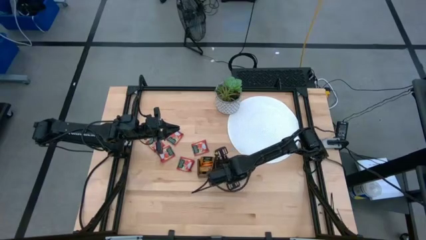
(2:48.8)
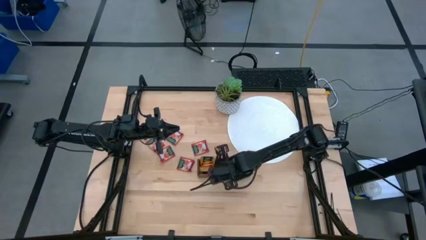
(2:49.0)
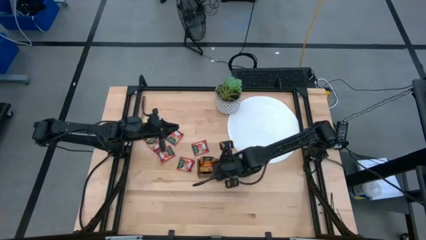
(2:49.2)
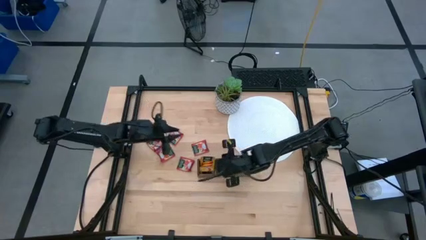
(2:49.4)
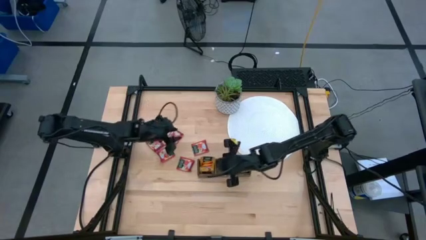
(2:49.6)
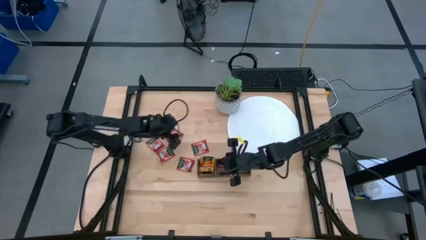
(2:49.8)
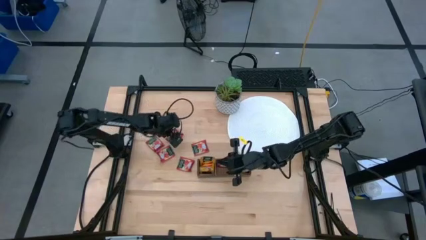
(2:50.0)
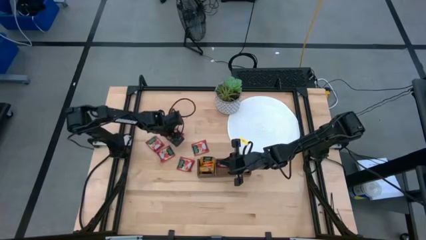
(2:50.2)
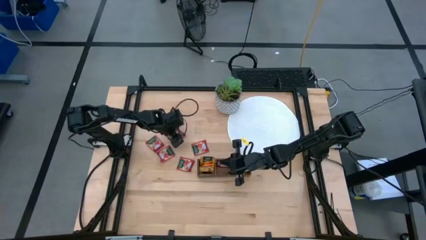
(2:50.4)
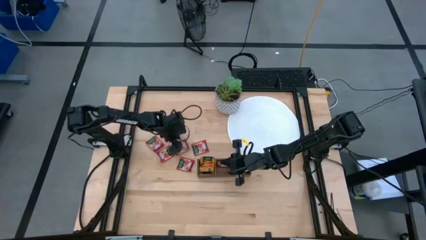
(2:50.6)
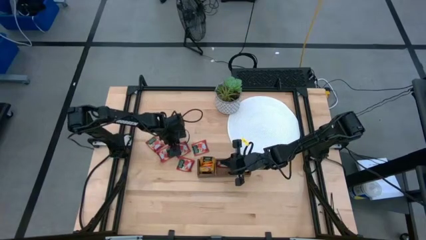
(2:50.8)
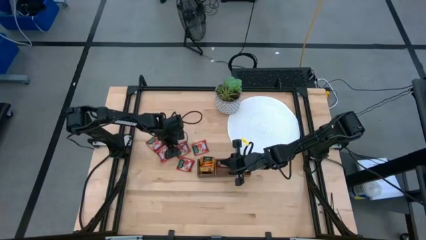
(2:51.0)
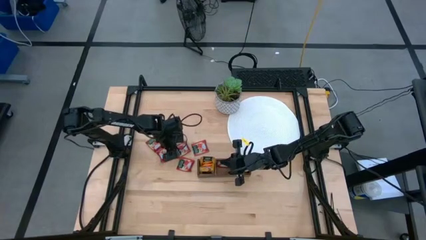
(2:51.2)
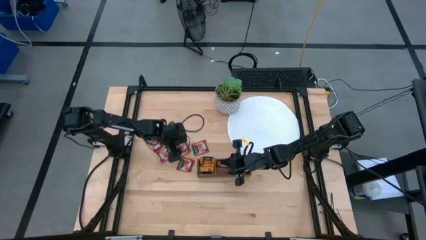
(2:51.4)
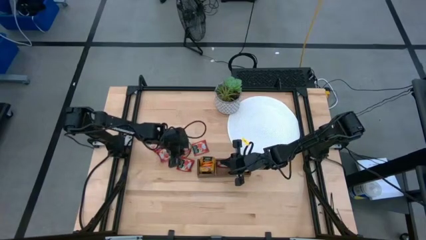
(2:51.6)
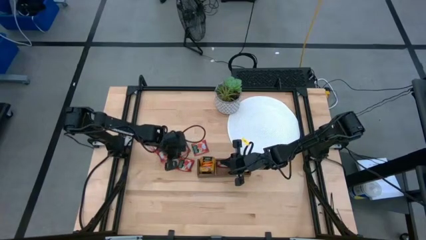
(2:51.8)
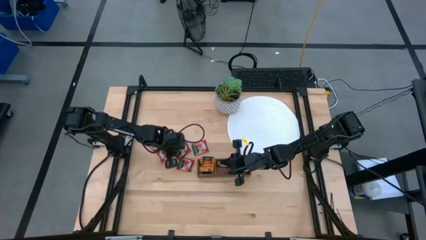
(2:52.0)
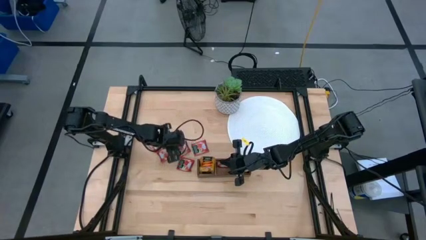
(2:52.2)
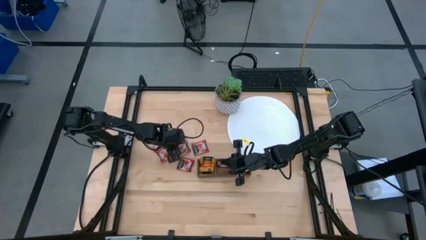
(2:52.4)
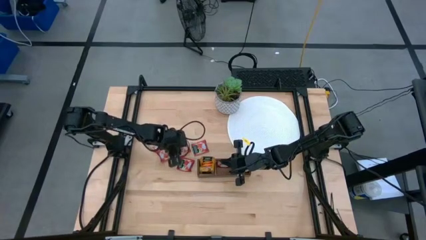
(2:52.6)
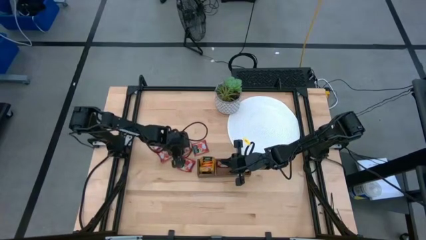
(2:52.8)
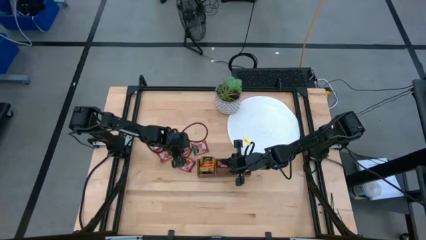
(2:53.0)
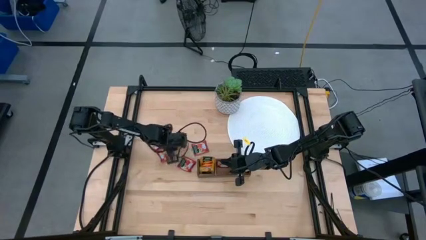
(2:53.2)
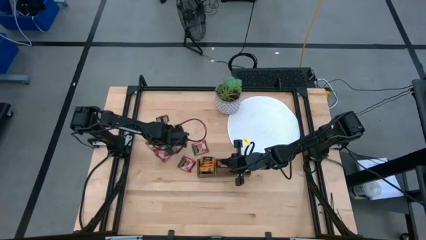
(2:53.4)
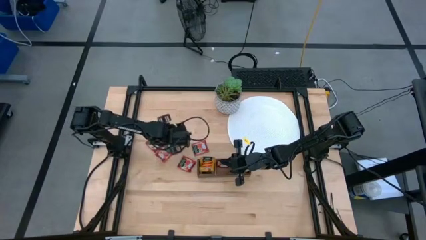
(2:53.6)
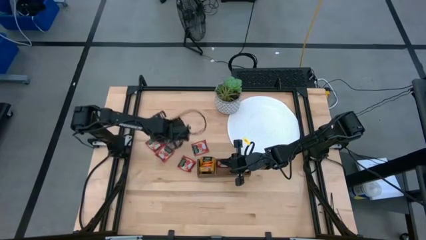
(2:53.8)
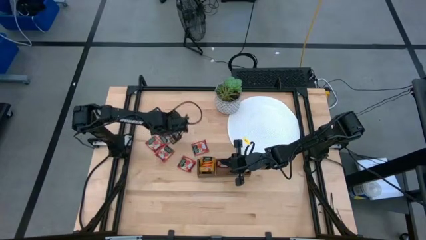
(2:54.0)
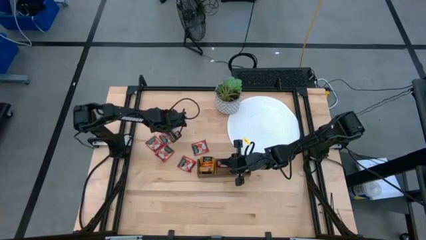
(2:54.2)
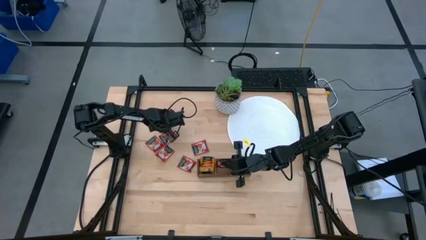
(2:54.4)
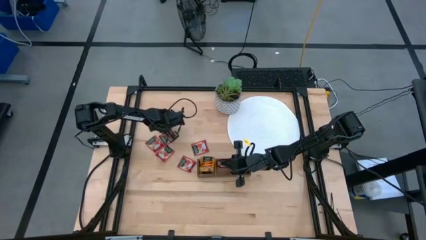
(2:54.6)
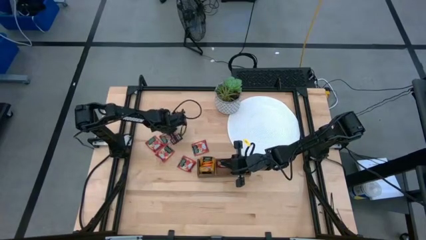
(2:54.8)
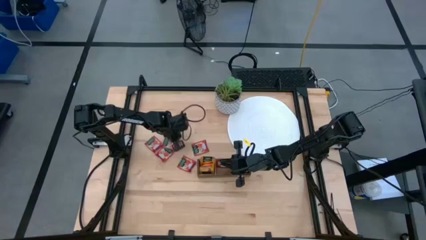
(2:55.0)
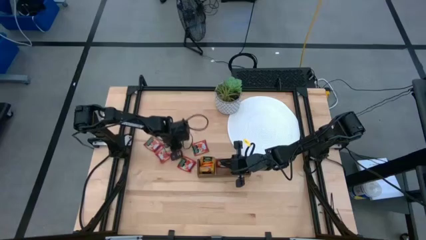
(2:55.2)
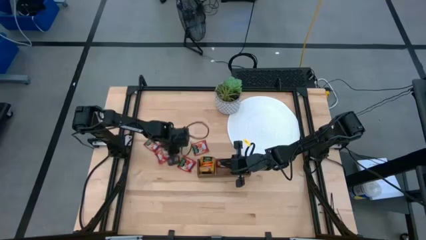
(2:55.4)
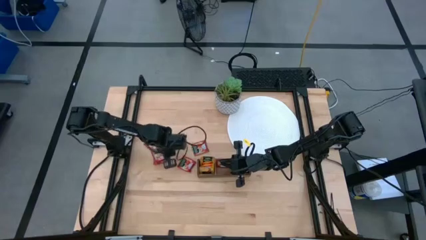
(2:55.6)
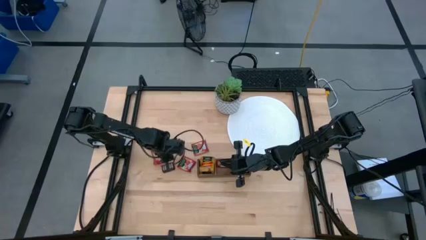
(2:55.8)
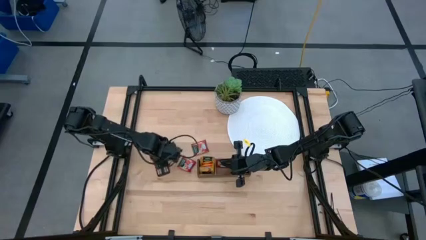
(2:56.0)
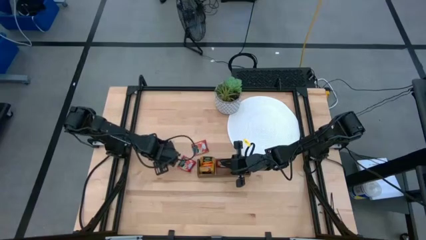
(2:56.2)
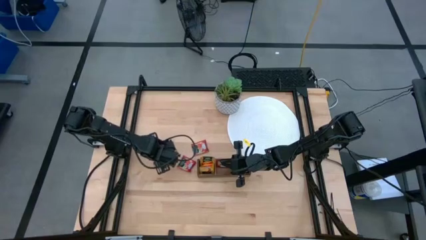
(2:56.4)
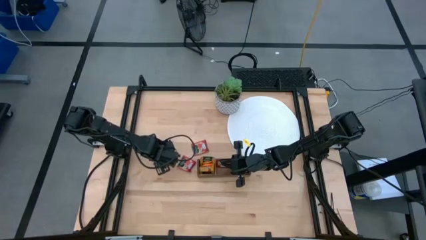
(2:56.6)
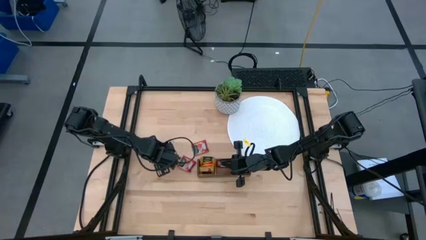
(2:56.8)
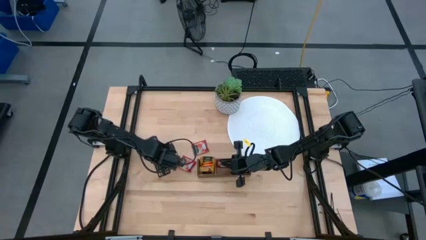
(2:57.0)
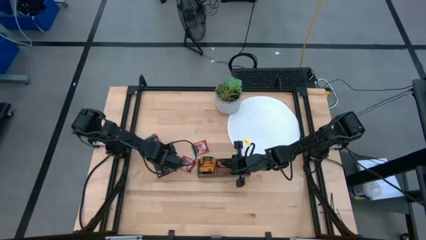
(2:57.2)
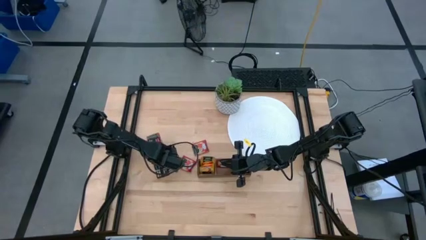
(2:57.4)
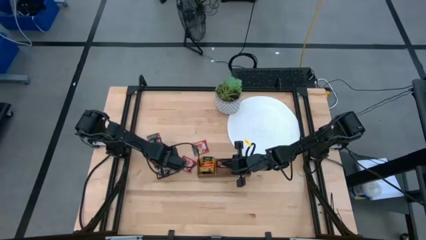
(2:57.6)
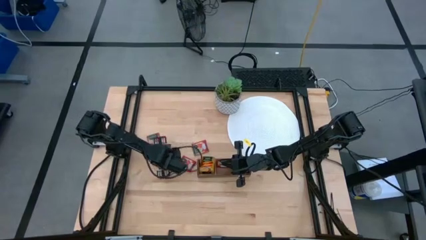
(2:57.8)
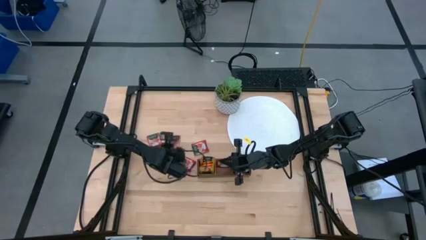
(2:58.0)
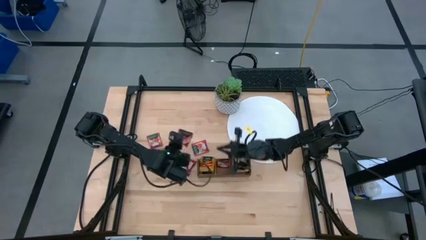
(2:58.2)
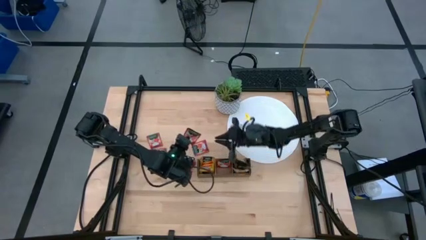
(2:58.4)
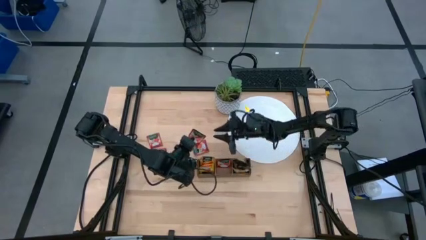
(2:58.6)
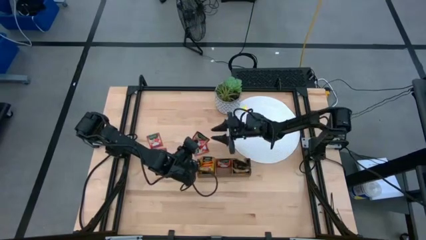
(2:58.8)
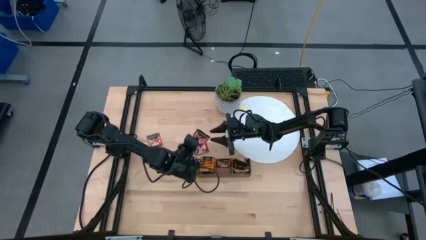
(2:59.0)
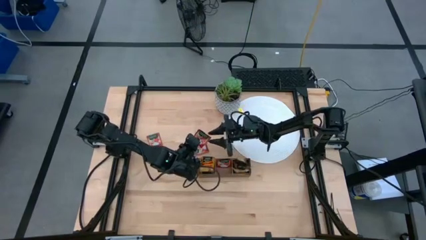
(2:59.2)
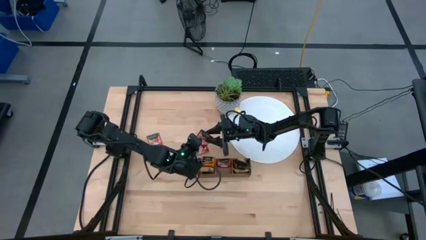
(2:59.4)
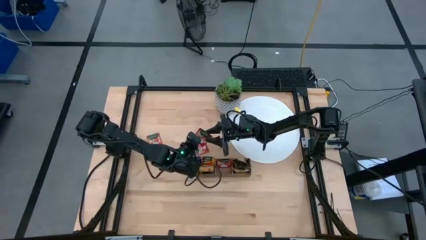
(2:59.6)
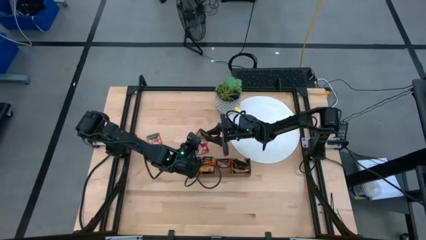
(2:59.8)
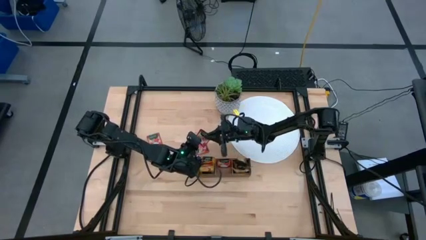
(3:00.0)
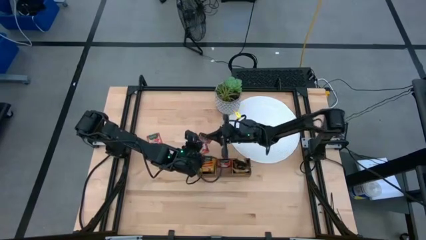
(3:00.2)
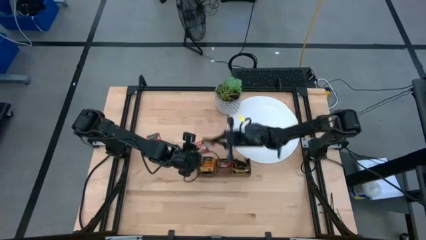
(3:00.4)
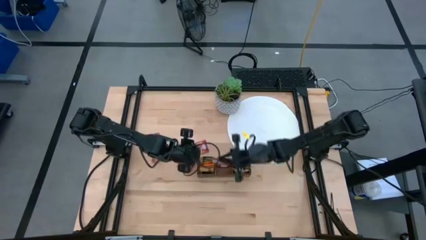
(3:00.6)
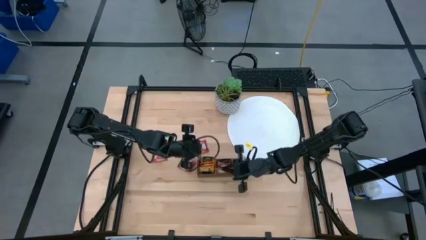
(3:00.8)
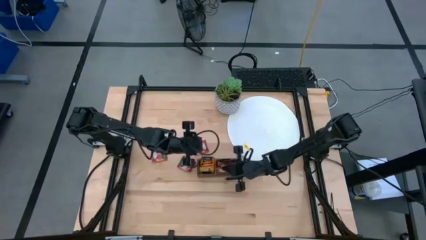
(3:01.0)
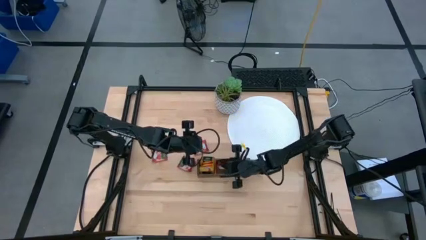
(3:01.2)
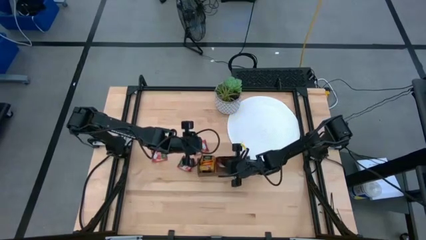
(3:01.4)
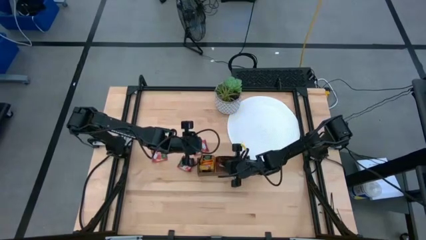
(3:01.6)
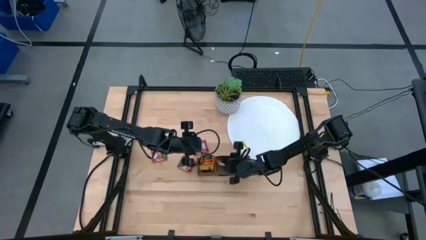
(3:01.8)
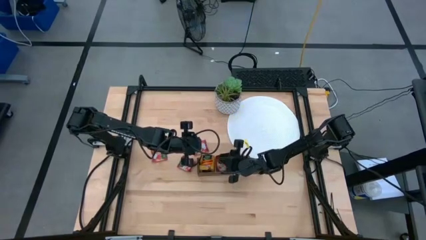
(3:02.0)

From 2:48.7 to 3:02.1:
Task: Pick & Place Tea
Put the red tea bag into the middle section of the wooden organizer

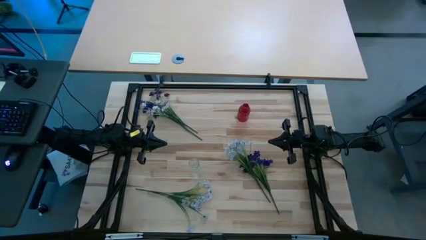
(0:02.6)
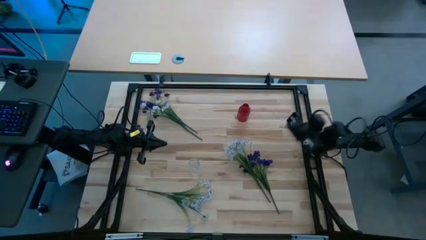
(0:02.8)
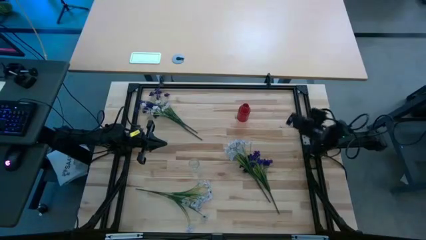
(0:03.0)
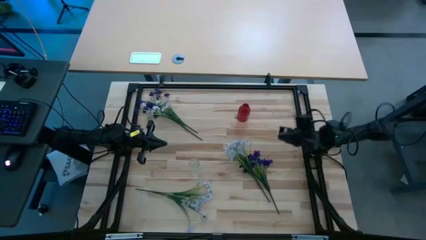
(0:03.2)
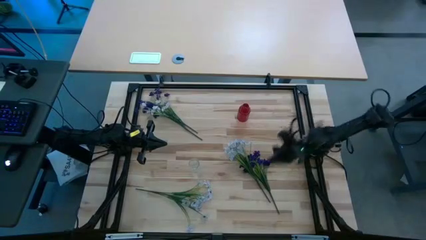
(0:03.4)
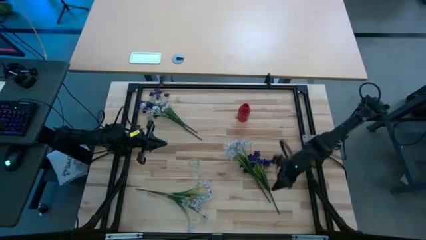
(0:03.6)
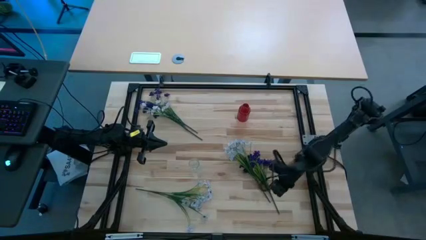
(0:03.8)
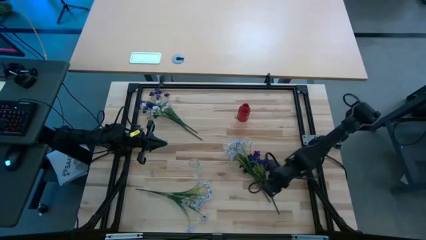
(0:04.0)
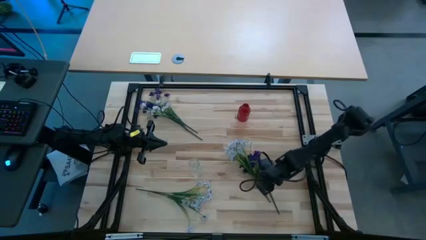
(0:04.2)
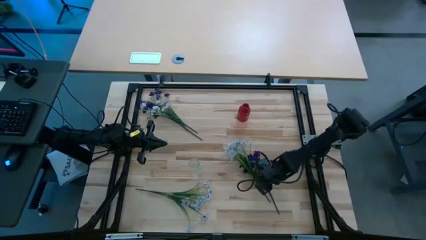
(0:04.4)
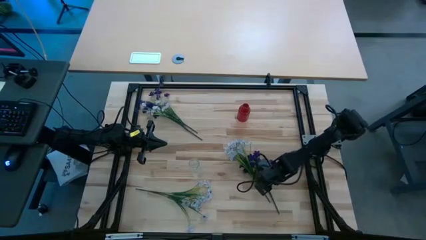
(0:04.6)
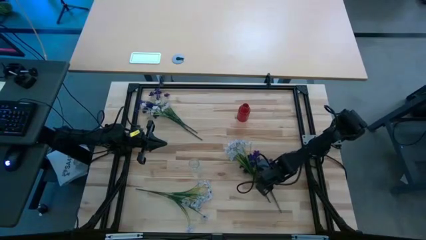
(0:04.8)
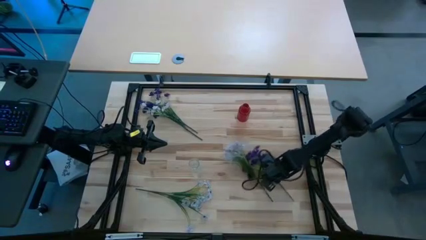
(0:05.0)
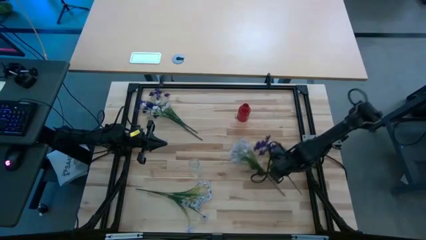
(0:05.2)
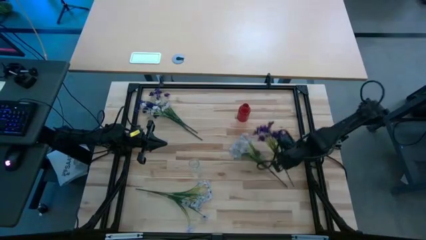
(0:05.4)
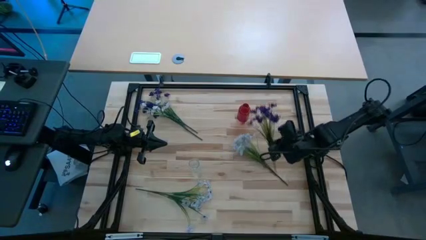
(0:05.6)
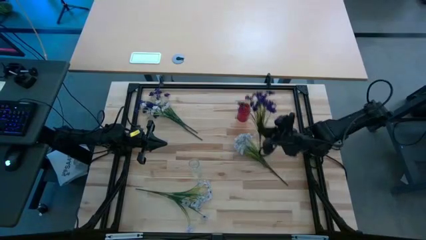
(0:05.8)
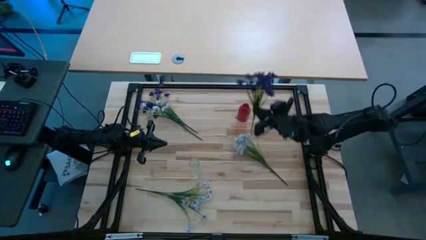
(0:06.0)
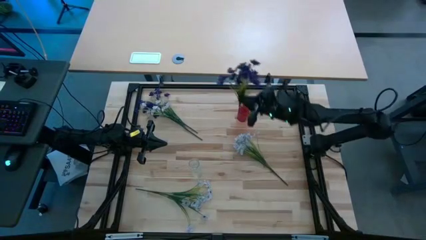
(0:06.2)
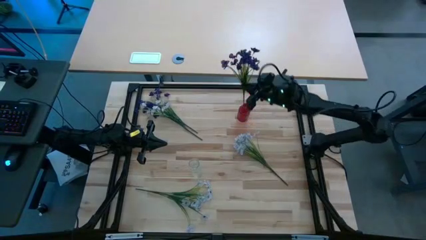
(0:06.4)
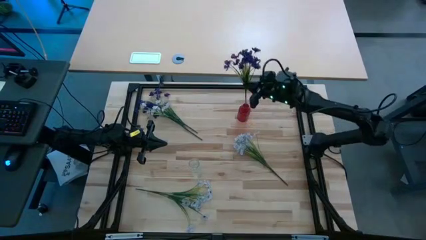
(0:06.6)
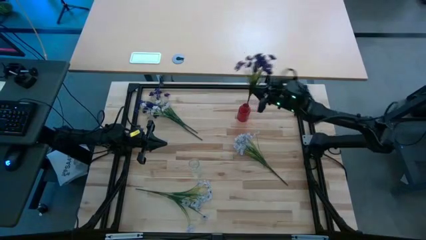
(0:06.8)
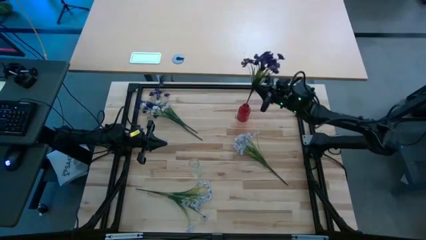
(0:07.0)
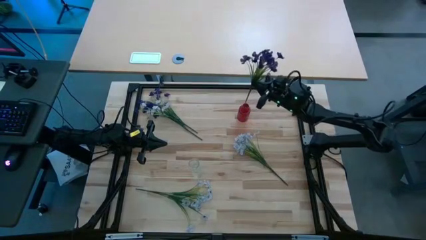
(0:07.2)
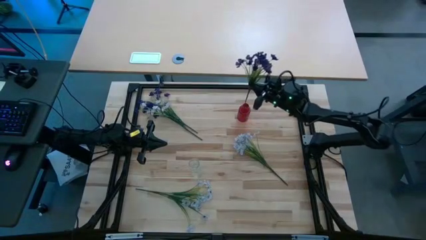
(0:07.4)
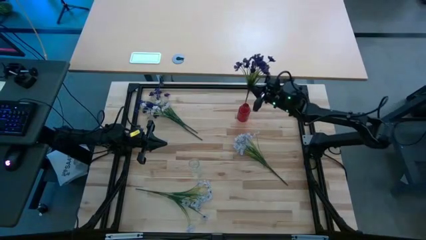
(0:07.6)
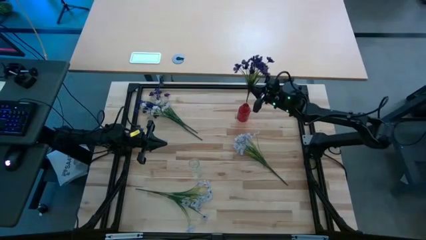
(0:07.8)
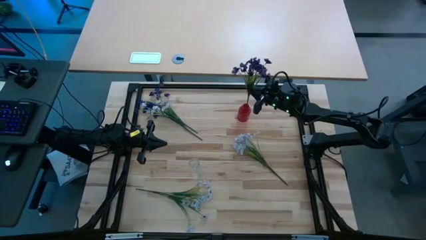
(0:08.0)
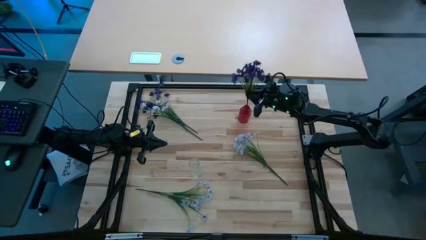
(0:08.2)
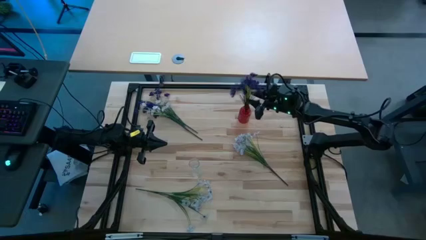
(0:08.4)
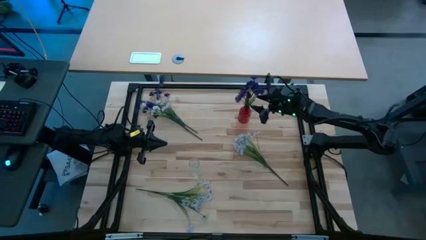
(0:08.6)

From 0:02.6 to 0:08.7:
Task: Sort flowers into vase by color
Put the bottom violet flowers into the red vase
